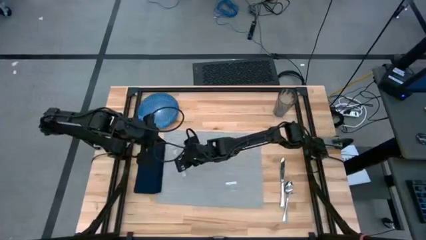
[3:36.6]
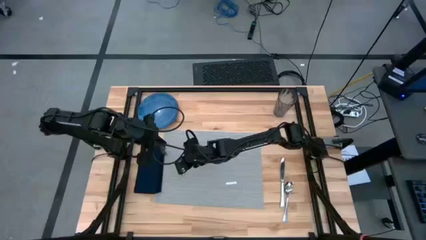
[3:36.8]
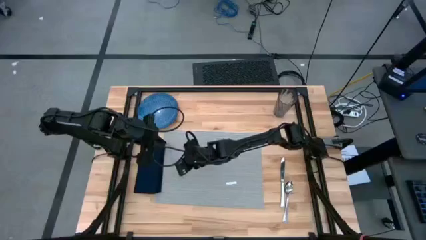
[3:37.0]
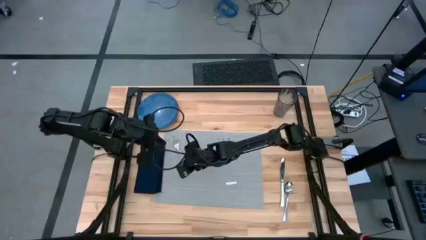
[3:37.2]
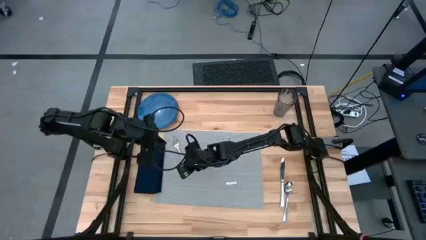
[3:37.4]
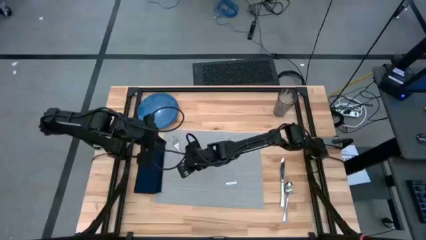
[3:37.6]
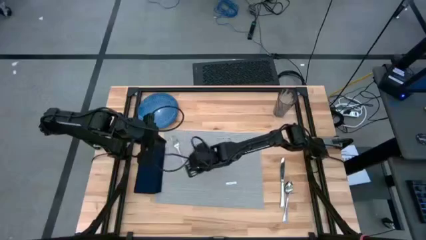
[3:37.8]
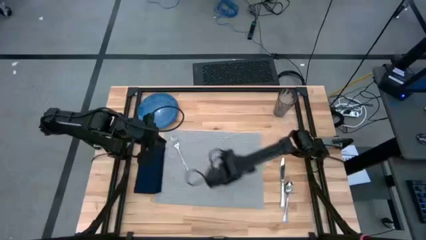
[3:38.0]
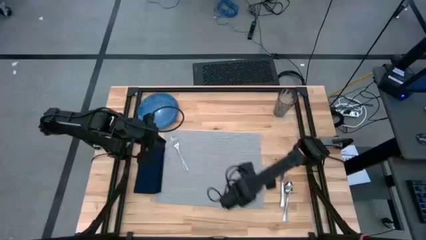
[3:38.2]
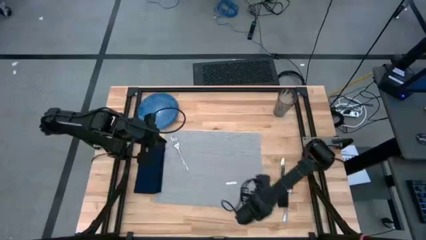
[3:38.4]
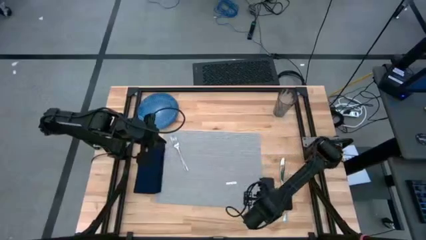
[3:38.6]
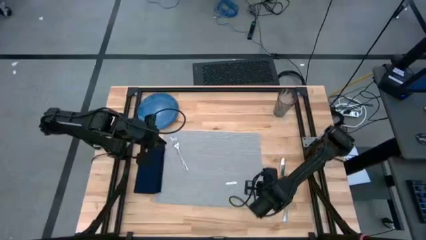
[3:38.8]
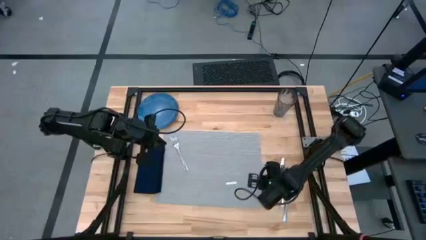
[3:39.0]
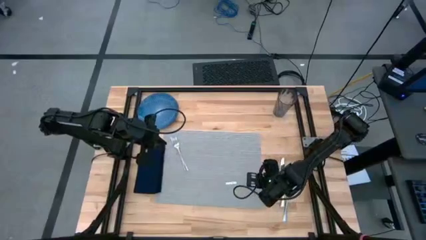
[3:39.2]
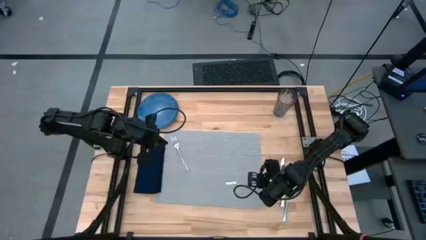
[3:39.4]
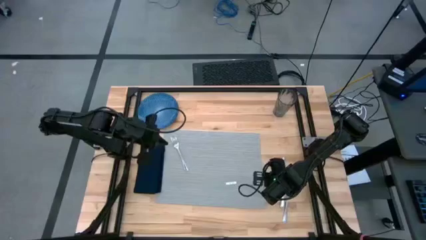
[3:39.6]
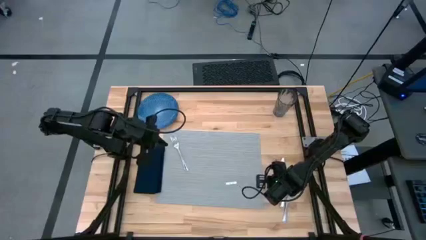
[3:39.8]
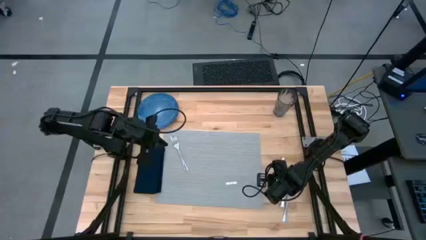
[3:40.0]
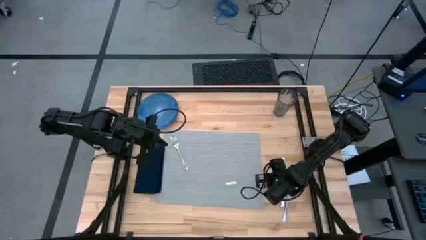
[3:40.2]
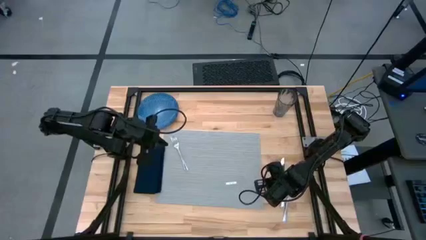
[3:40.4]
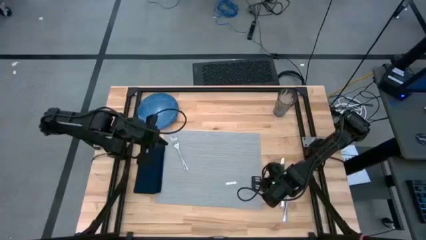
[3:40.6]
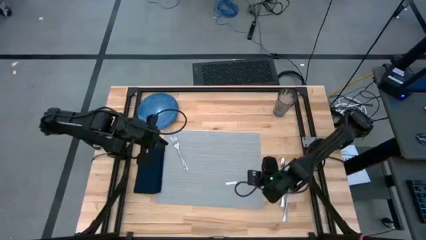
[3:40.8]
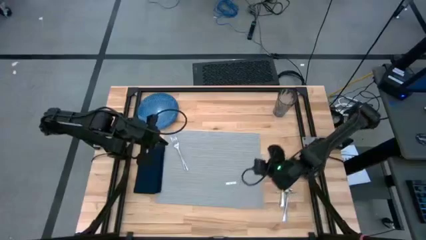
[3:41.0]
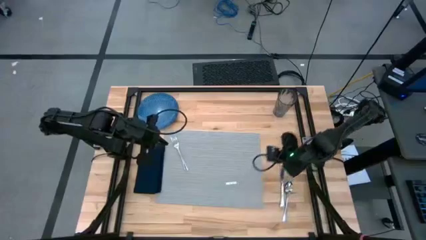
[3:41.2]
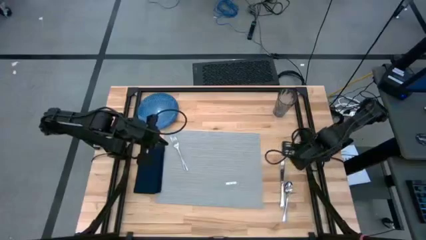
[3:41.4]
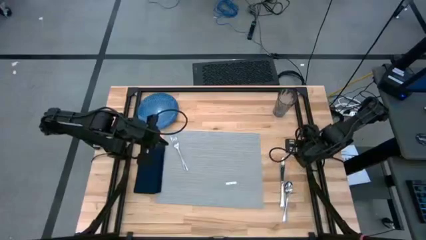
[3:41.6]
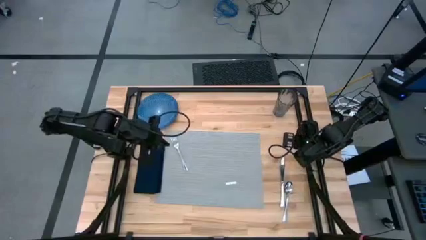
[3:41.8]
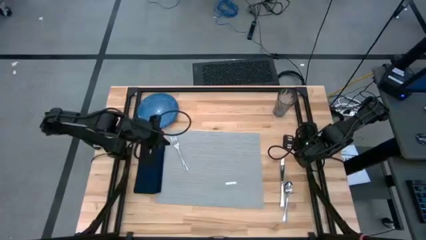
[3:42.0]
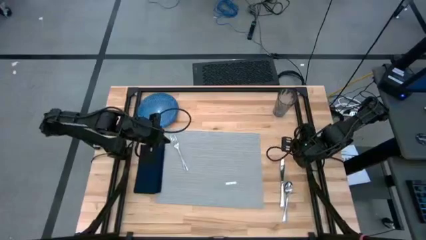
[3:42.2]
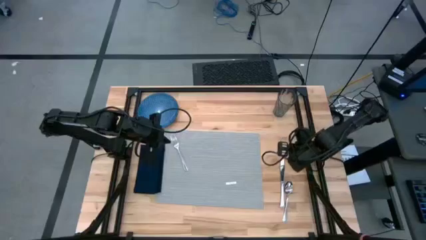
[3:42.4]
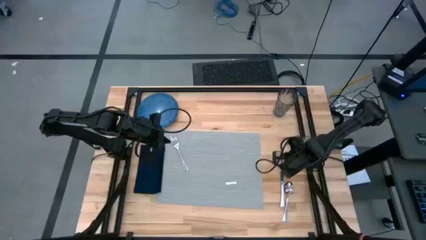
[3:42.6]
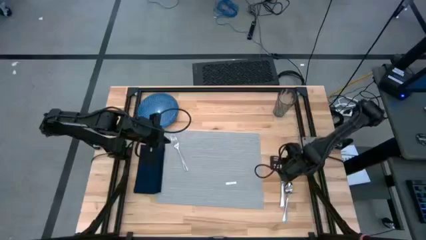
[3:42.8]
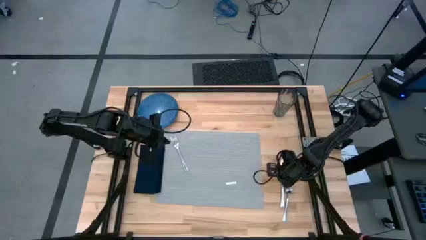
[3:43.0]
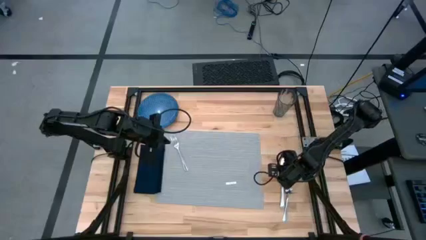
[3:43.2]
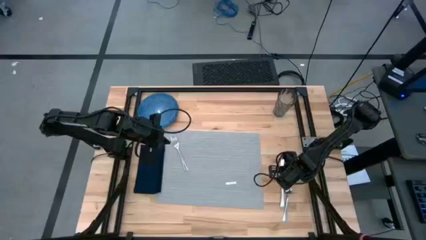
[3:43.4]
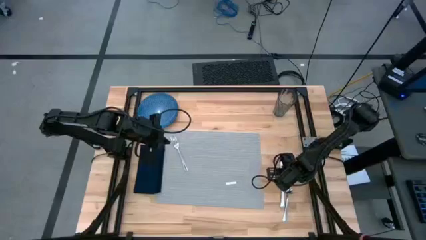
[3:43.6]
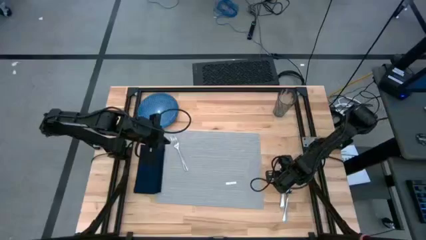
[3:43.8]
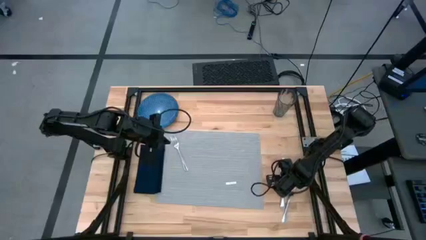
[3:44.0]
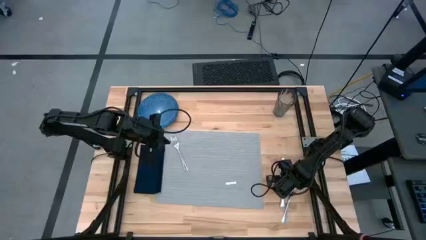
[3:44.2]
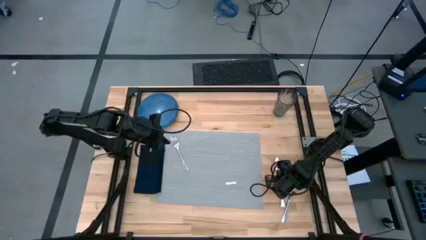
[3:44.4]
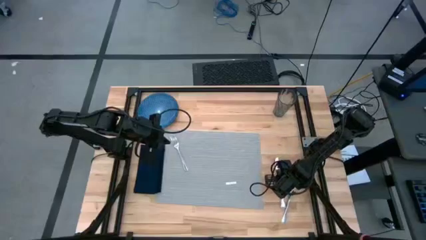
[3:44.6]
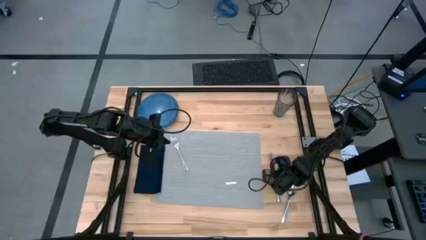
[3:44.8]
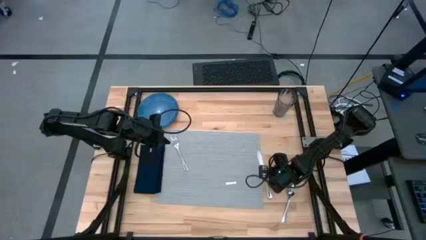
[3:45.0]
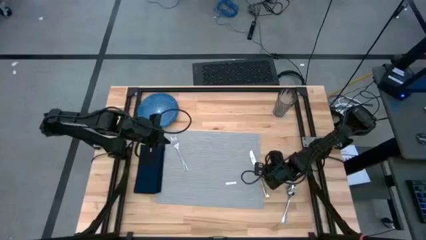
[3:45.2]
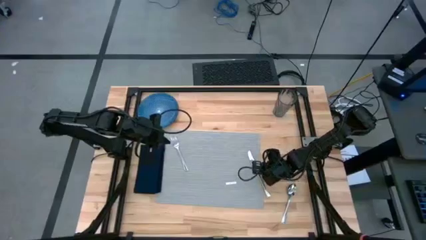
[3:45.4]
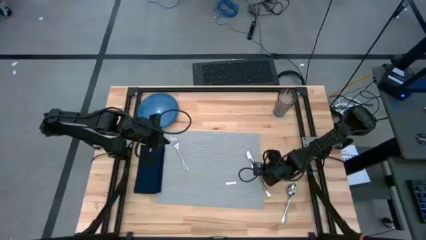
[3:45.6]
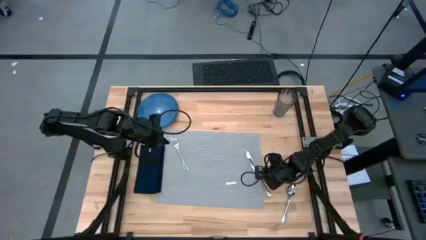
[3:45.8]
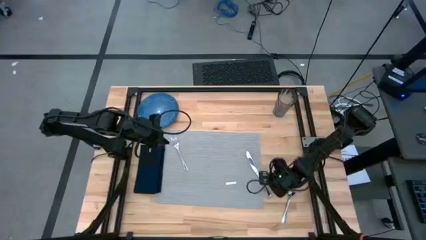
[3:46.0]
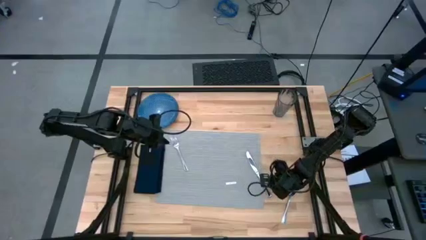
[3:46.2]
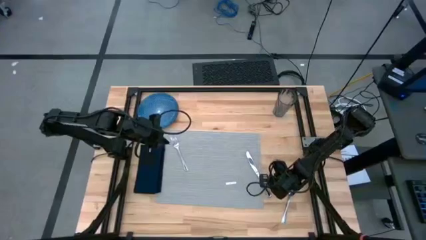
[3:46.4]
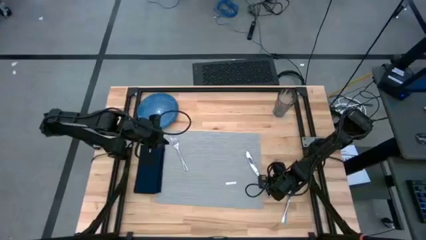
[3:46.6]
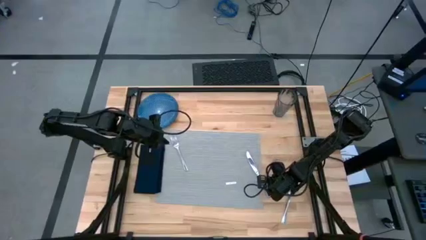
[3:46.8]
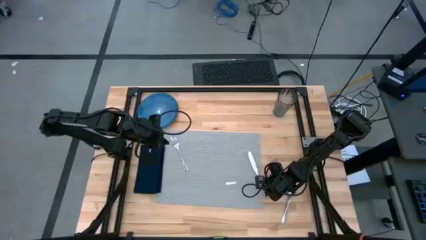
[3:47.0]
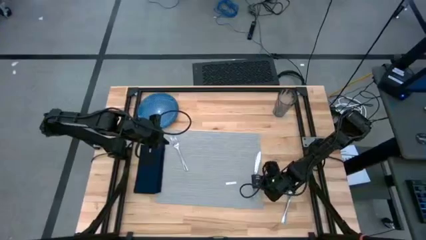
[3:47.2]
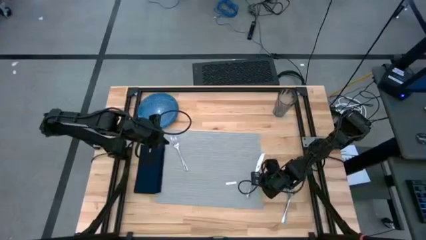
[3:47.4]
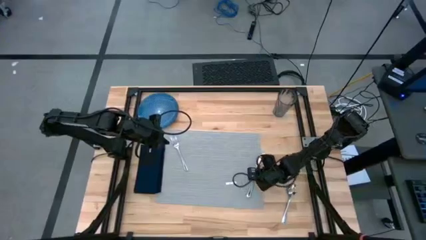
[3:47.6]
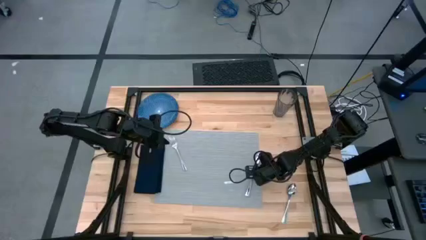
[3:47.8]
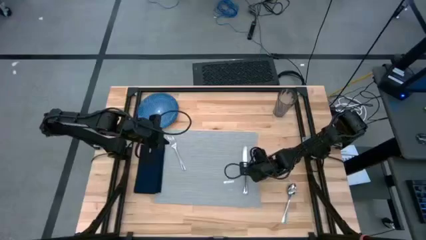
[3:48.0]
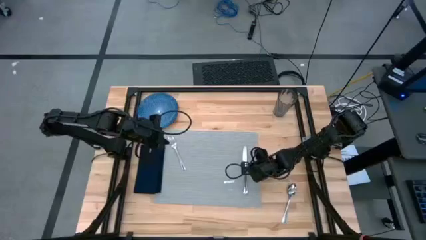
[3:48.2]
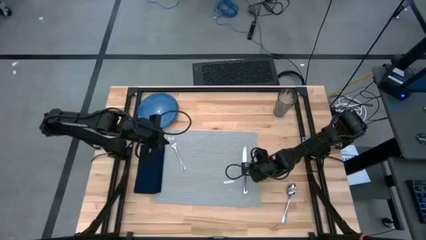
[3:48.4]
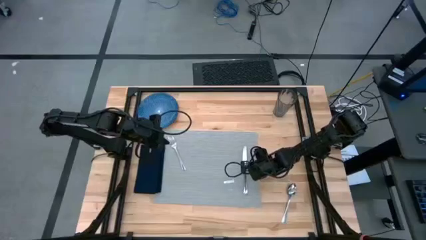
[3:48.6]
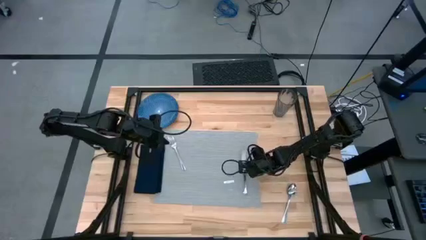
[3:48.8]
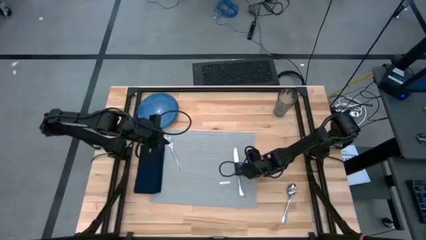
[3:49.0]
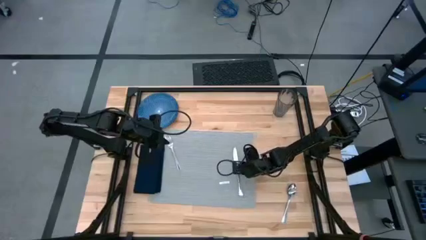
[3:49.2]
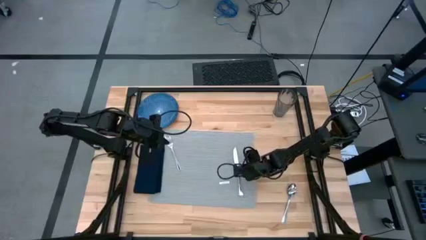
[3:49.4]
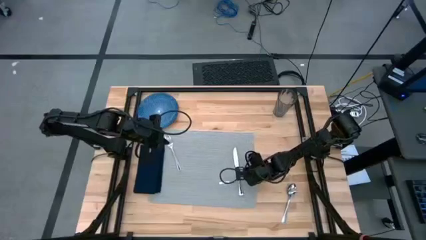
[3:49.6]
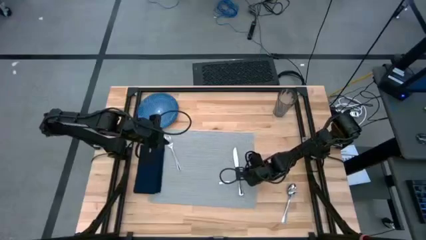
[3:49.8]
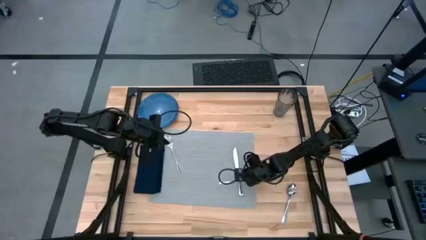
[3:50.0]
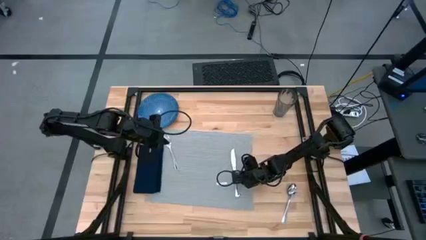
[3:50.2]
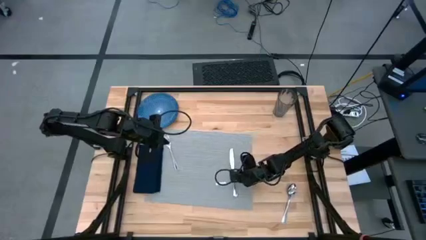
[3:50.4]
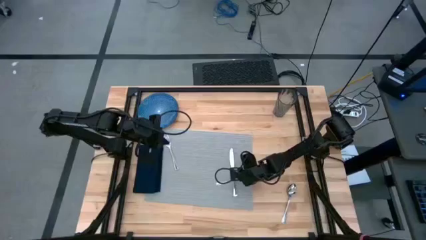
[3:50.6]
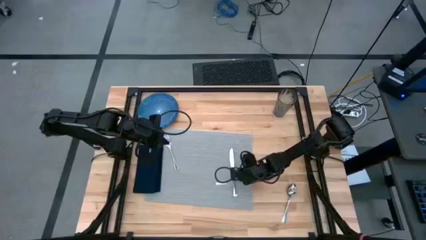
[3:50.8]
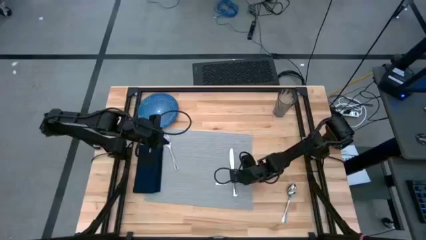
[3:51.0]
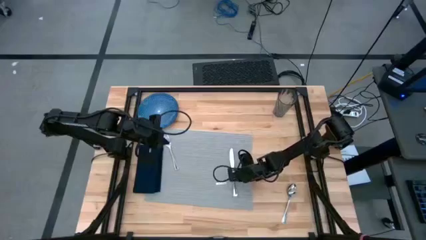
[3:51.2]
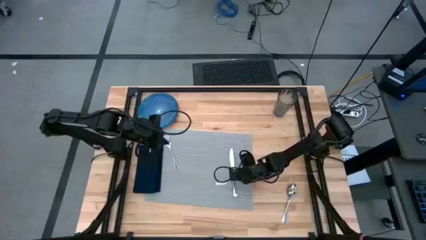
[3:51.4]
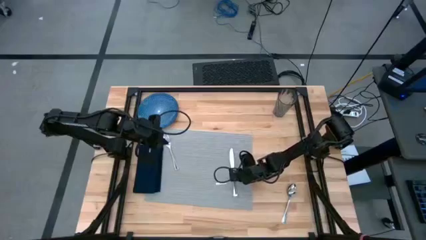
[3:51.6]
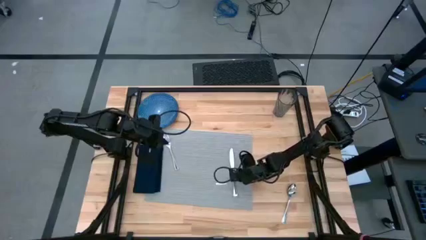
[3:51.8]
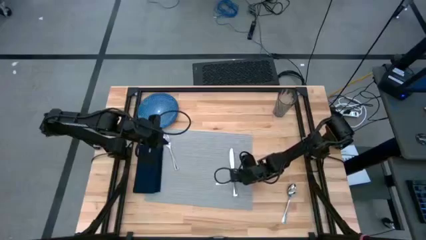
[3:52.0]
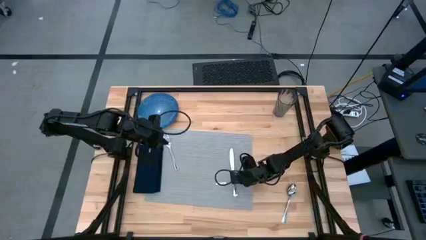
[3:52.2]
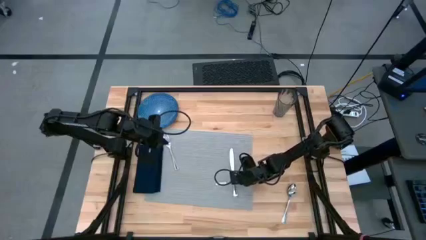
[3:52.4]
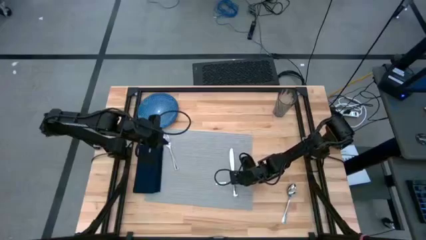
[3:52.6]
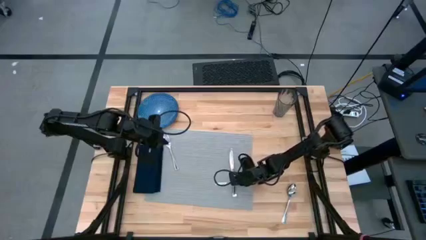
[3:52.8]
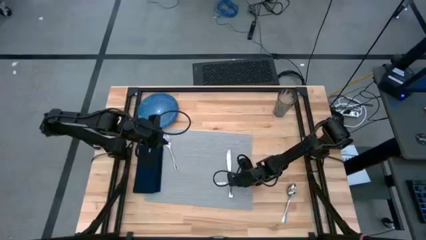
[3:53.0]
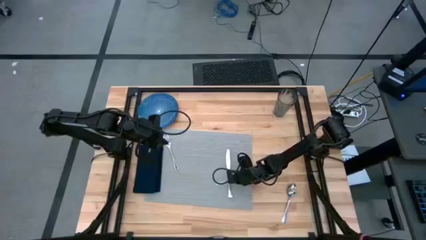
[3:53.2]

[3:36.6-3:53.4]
Task: Set table place
Put the silver knife on the right side of the gray placemat
